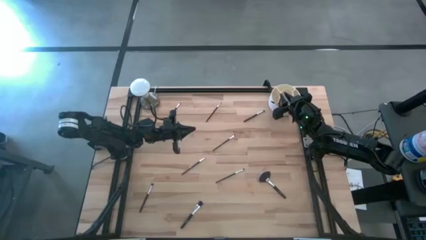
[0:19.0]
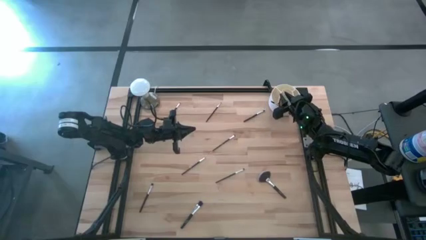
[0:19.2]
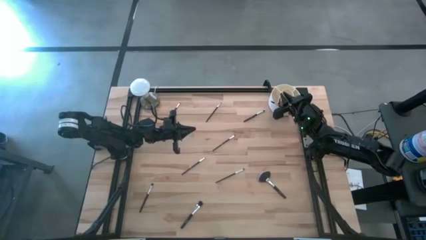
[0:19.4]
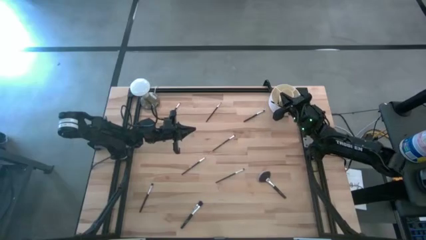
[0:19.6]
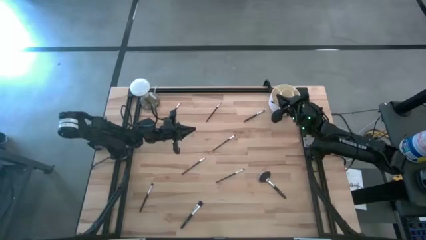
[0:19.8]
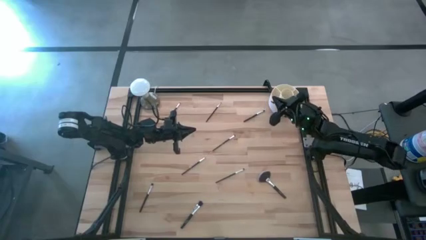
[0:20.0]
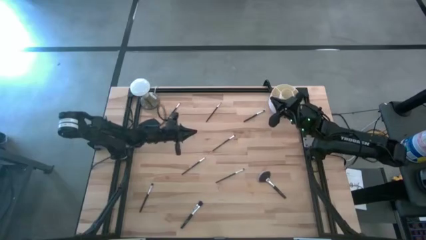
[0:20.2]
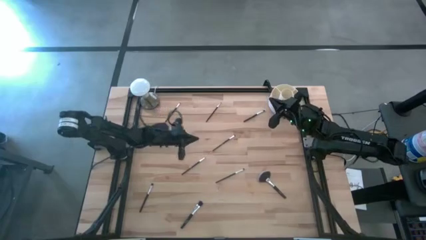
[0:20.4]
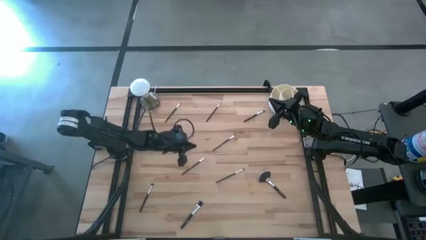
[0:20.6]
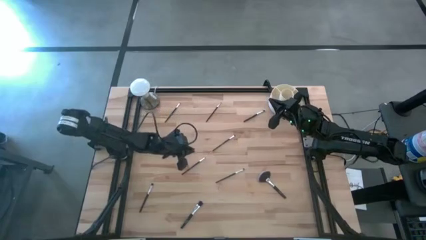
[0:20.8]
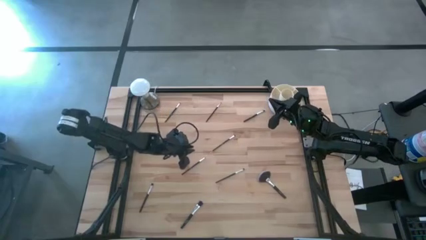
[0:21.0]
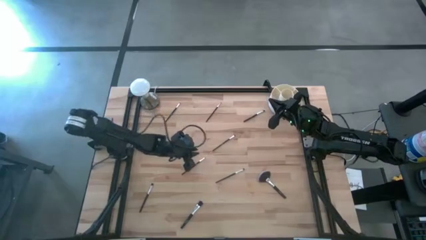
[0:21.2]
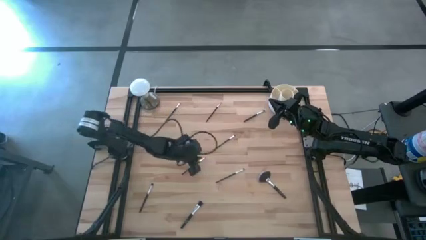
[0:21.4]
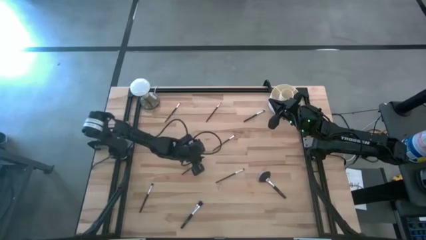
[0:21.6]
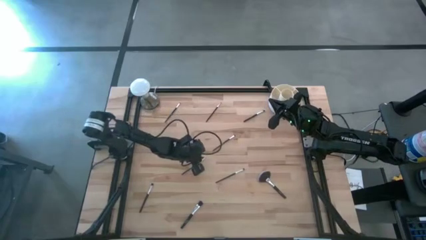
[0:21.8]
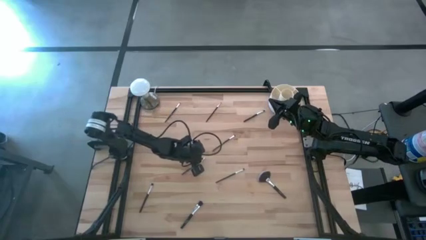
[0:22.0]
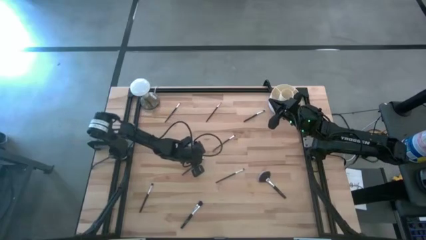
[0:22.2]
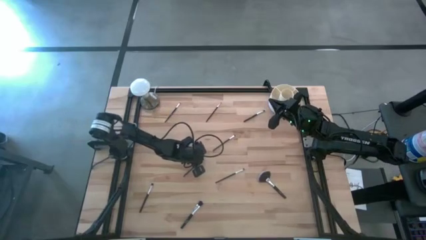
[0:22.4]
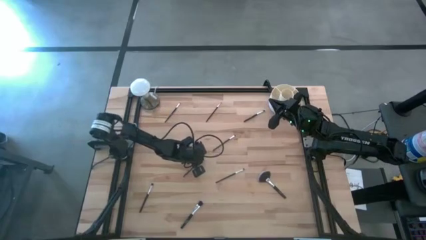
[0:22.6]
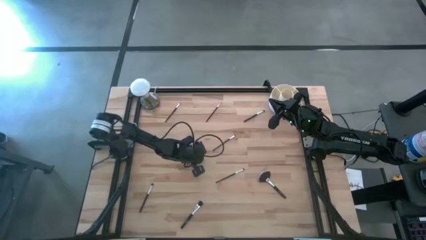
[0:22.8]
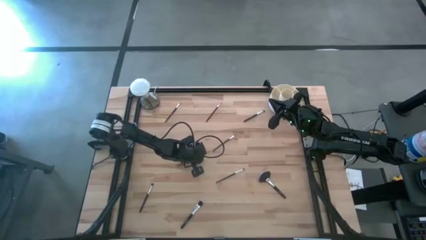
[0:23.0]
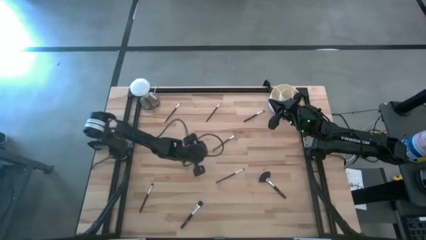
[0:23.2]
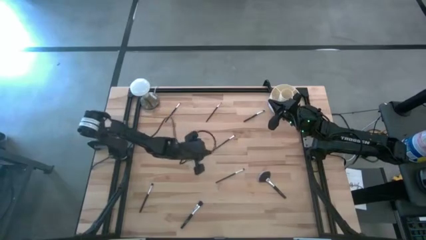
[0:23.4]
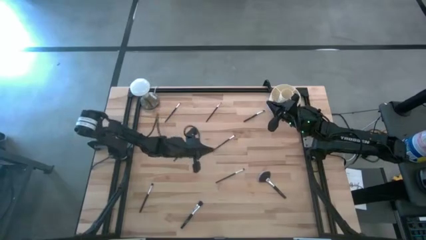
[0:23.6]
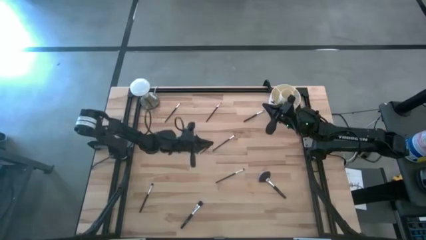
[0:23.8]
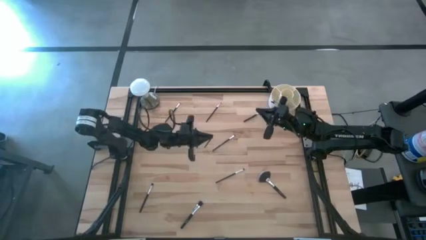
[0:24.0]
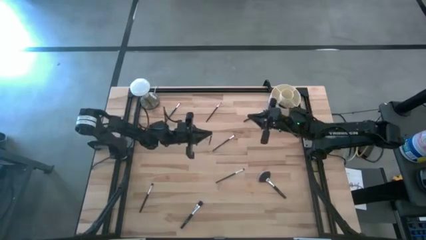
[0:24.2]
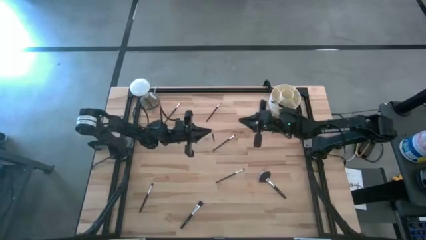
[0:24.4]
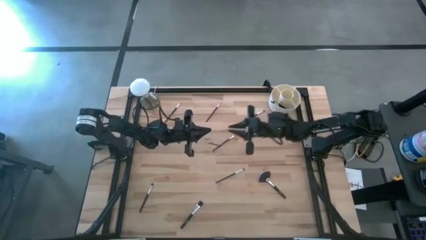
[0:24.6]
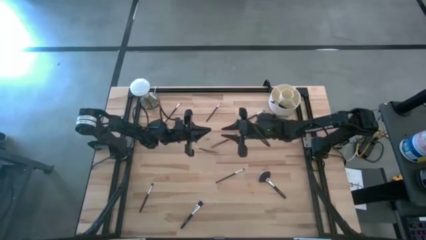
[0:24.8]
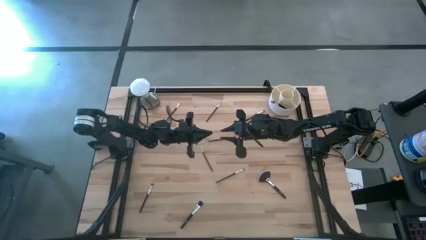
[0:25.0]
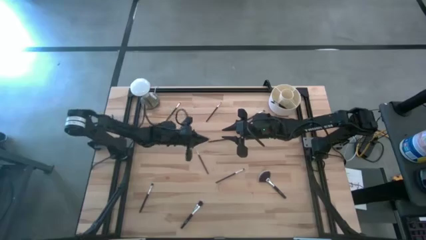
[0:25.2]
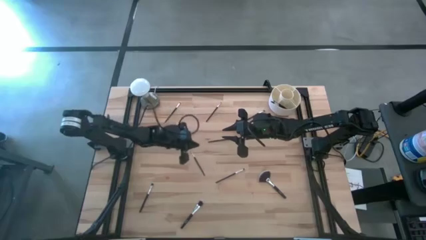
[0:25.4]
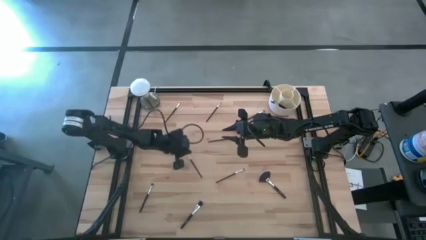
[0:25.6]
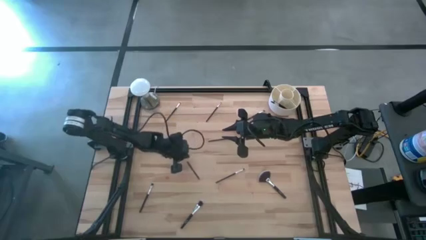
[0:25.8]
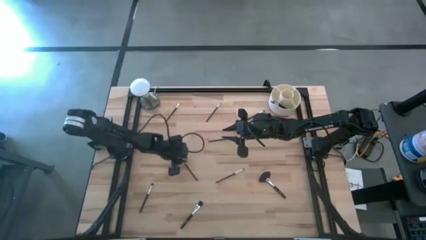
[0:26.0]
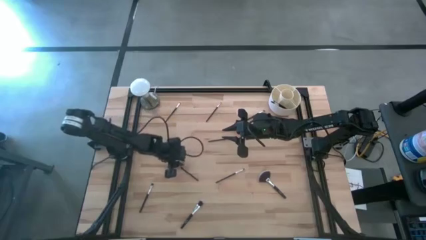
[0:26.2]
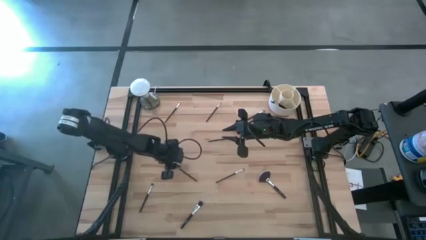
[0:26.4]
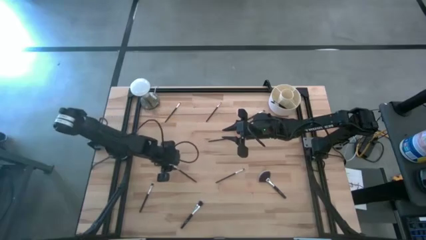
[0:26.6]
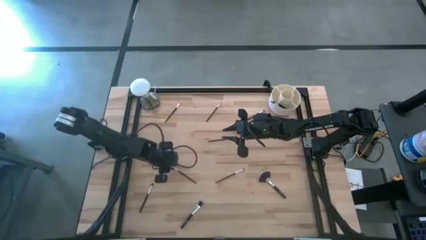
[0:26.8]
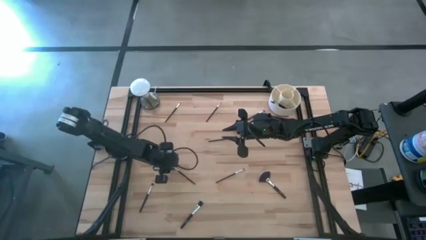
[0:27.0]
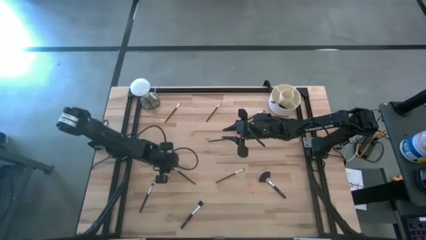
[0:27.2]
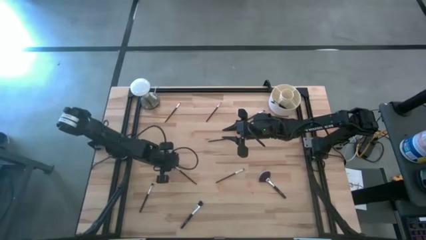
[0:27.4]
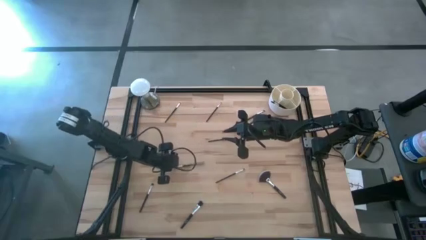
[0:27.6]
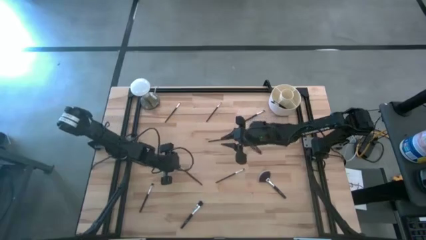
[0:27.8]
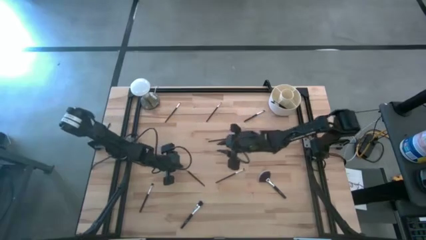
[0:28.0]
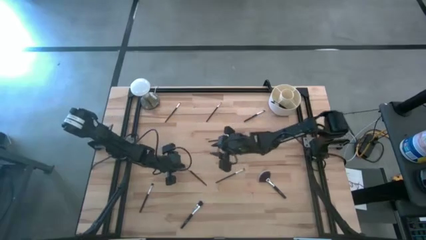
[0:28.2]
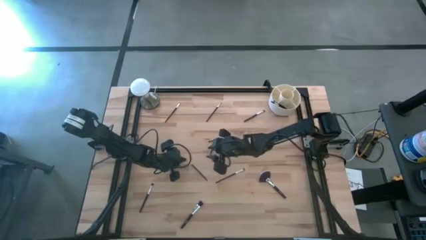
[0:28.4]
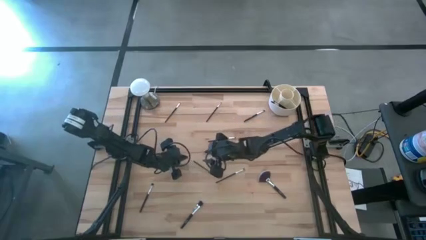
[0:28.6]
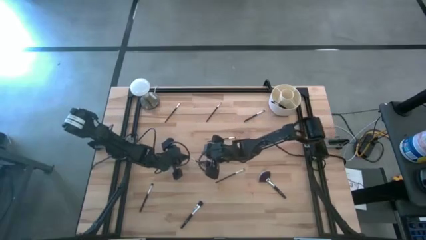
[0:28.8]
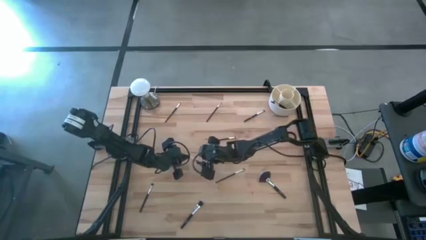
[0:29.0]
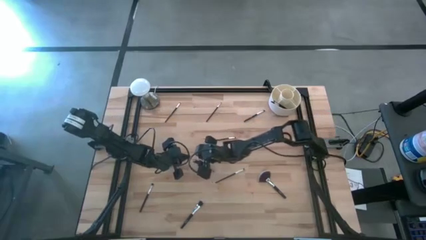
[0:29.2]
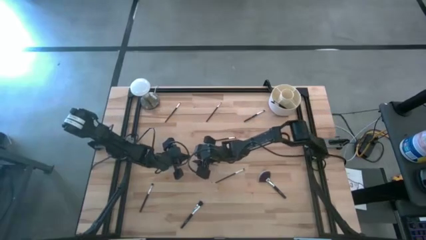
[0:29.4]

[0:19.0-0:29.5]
Task: Put items in baskets/containers
Put the brown liner brush into the white organizer

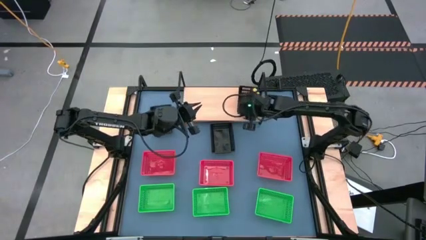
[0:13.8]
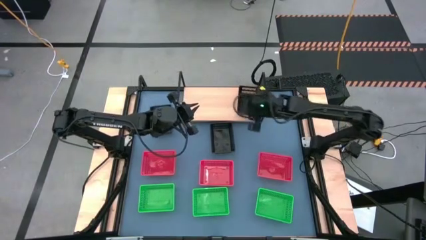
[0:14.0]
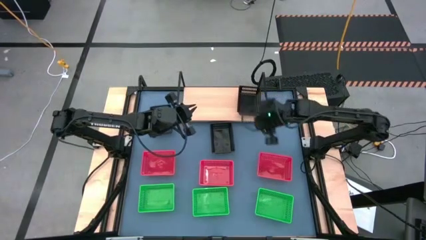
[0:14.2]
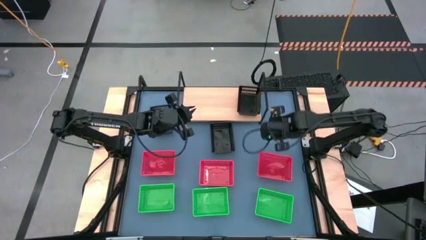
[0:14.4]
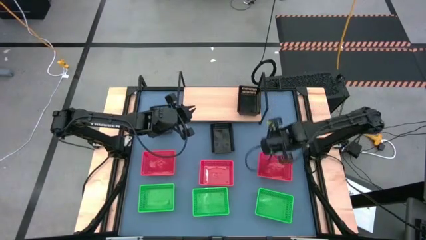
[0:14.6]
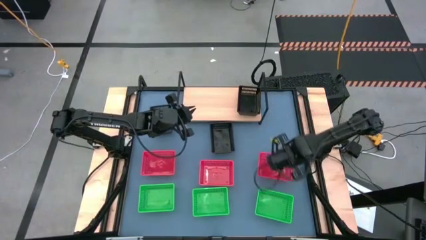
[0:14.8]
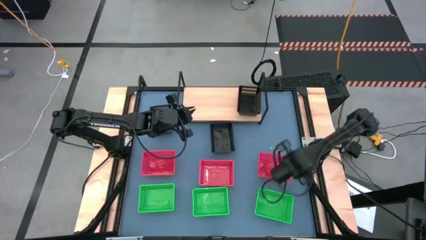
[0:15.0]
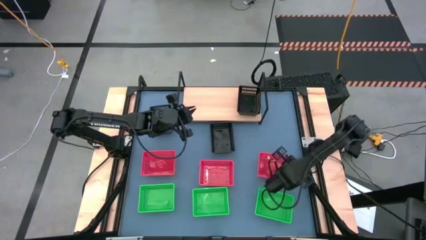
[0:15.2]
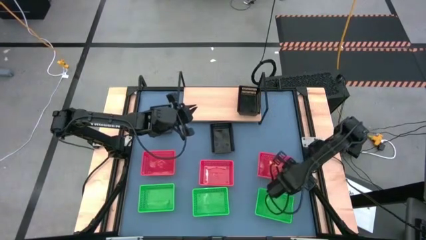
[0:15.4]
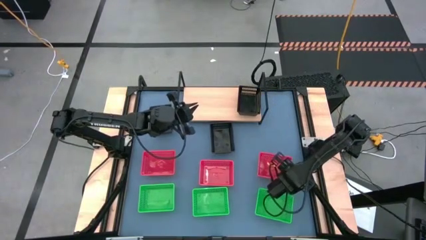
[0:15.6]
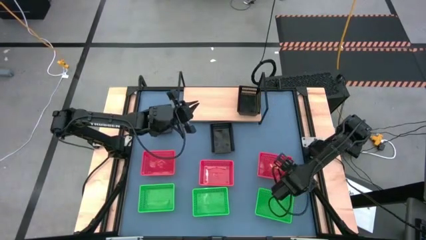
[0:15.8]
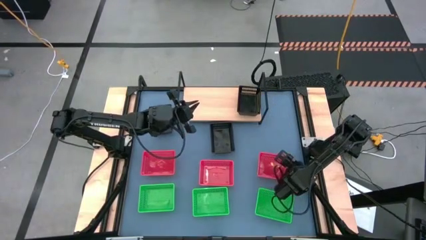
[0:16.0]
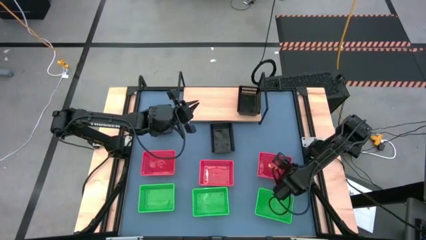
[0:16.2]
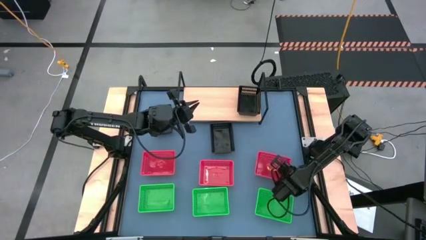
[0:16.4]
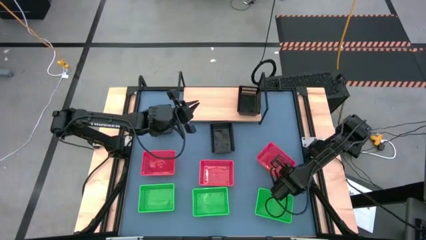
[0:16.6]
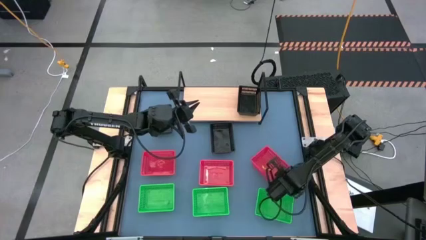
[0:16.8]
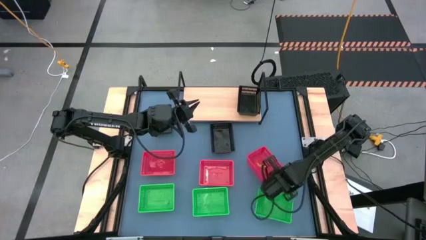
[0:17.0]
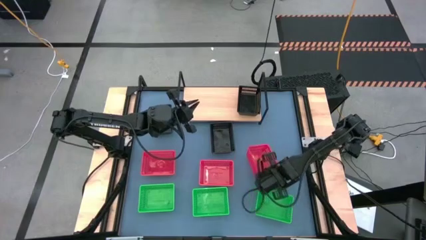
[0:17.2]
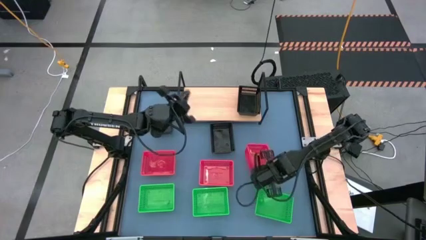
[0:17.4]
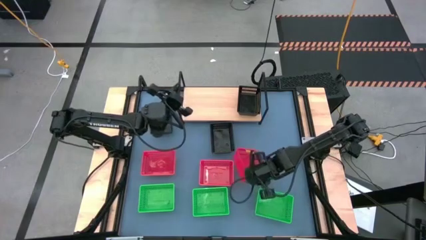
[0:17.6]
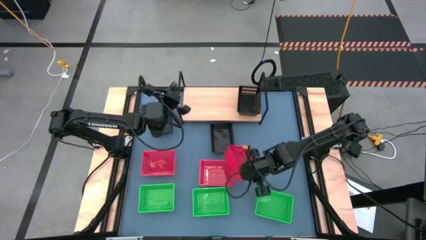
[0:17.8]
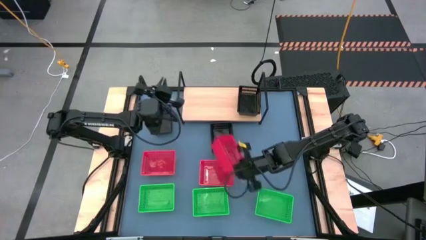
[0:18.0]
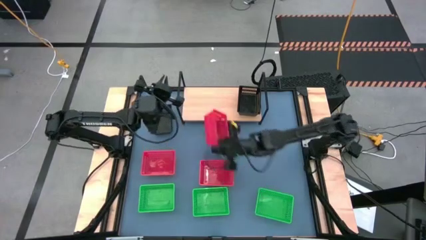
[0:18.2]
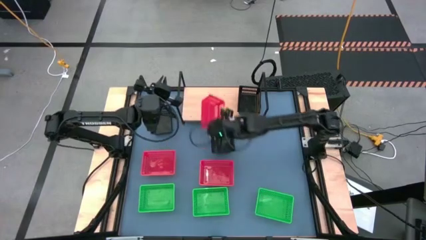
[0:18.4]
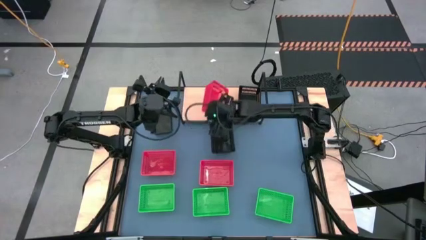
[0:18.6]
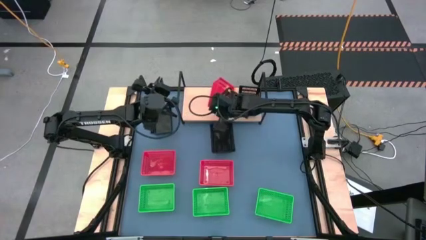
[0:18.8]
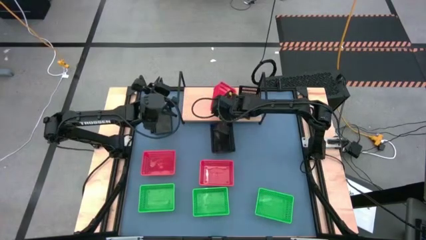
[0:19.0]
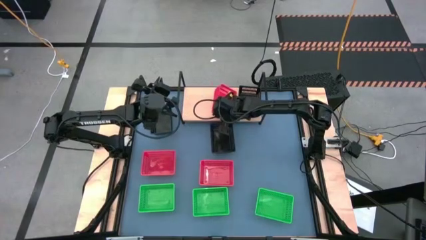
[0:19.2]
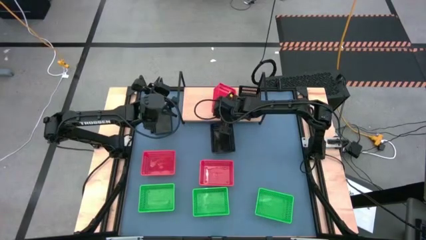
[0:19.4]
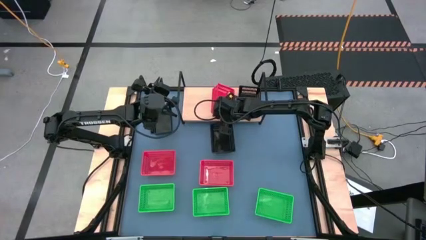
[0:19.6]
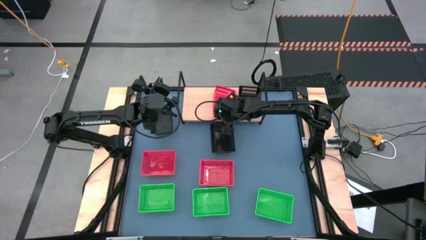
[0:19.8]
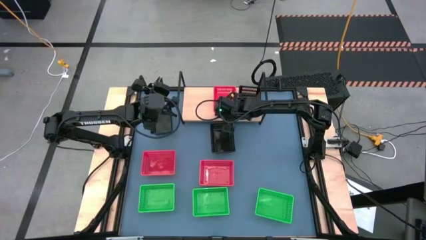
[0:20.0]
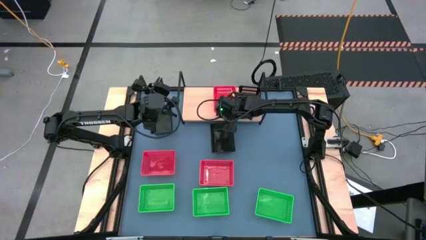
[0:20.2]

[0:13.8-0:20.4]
Task: Stack baskets on shelf by color
Put the right red bin on the shelf
